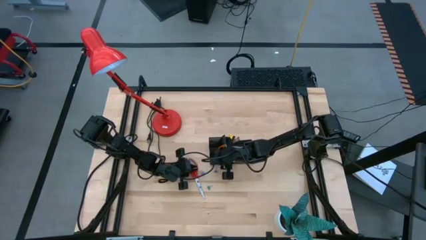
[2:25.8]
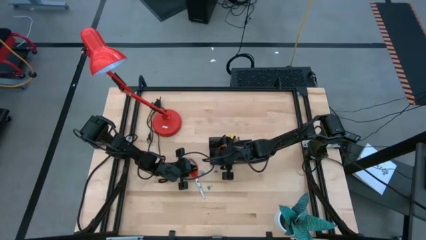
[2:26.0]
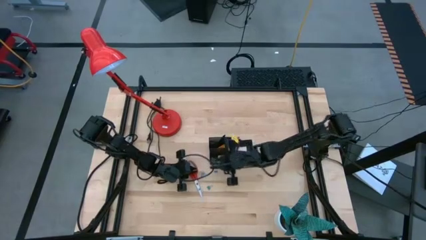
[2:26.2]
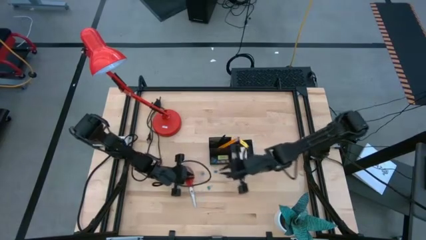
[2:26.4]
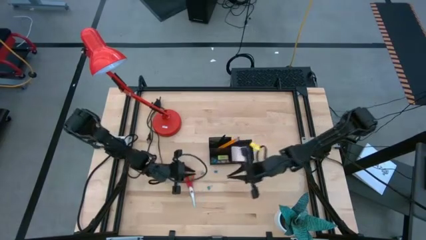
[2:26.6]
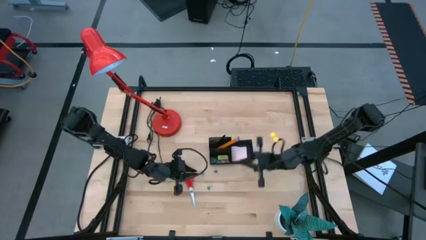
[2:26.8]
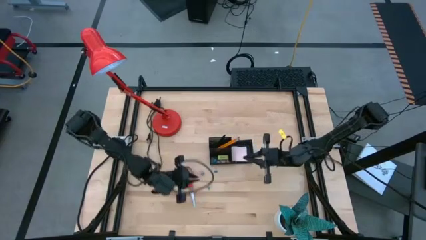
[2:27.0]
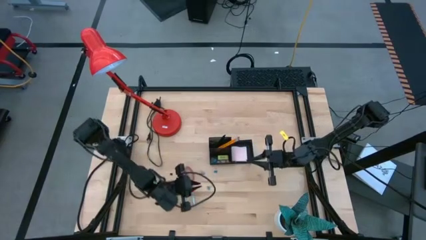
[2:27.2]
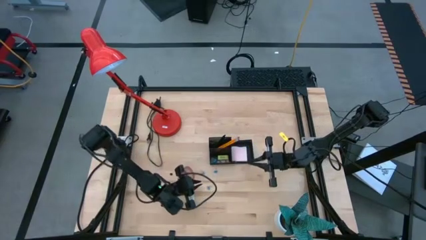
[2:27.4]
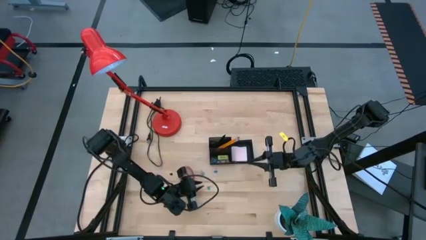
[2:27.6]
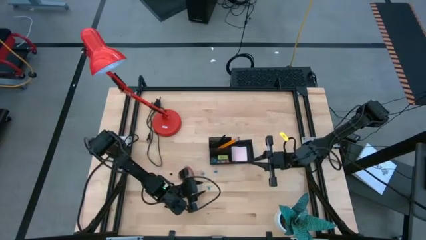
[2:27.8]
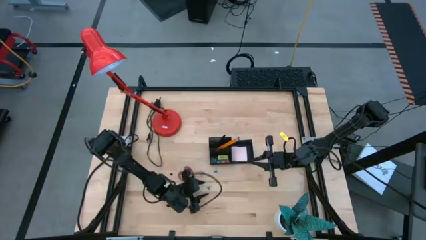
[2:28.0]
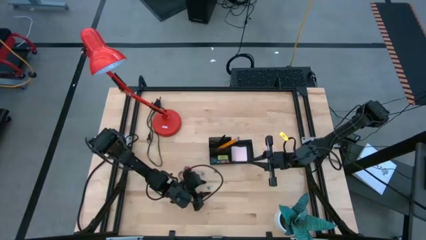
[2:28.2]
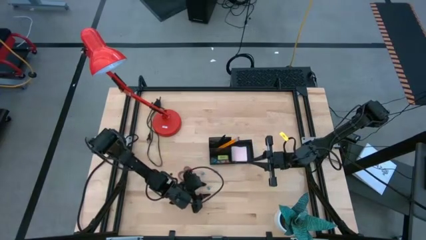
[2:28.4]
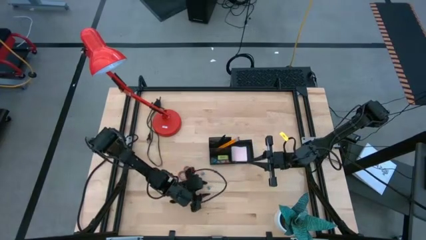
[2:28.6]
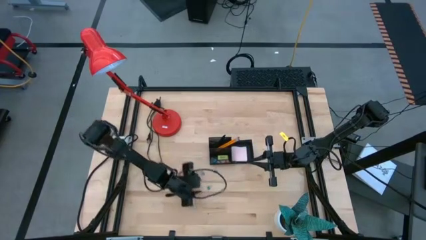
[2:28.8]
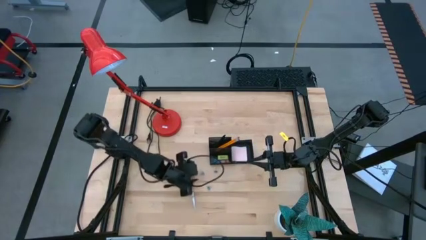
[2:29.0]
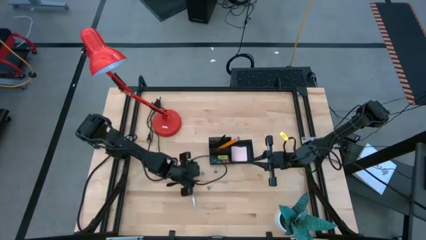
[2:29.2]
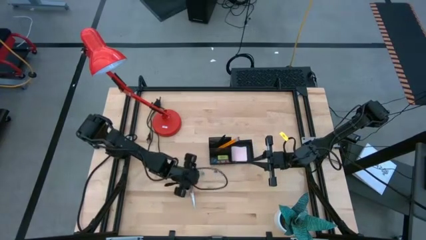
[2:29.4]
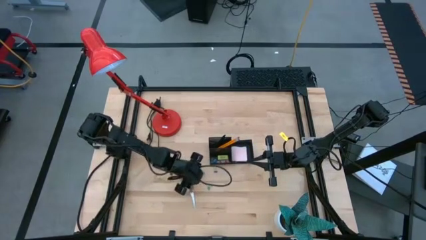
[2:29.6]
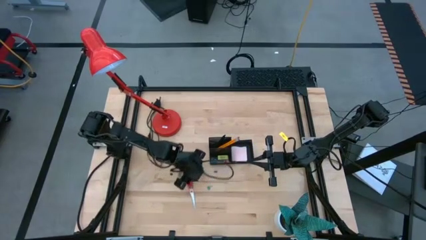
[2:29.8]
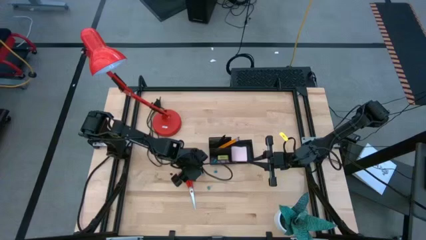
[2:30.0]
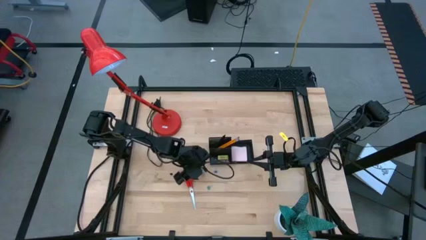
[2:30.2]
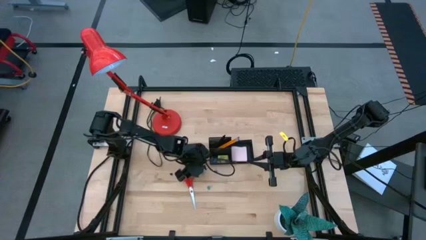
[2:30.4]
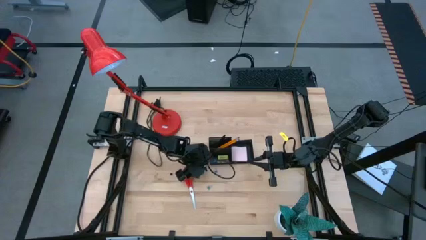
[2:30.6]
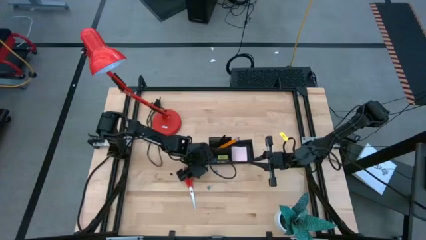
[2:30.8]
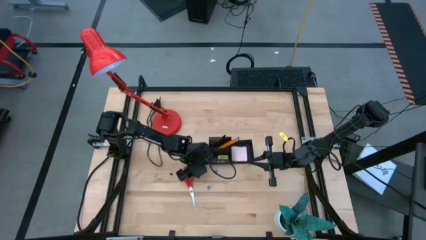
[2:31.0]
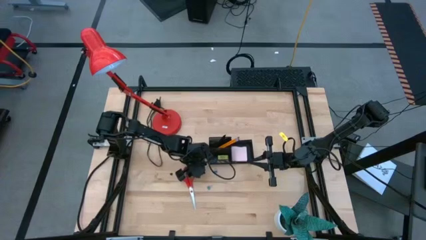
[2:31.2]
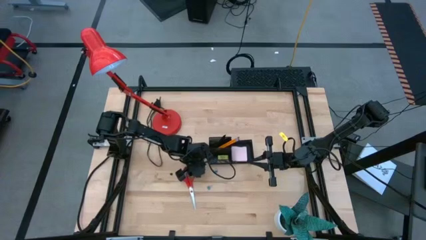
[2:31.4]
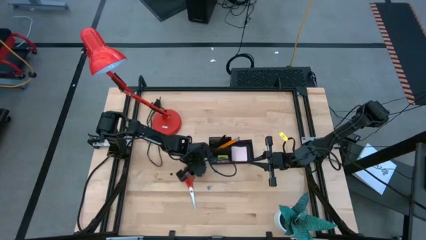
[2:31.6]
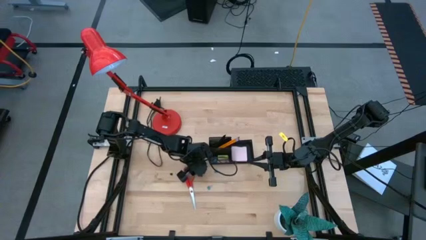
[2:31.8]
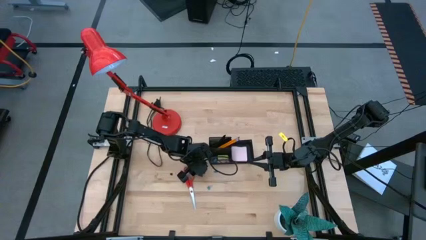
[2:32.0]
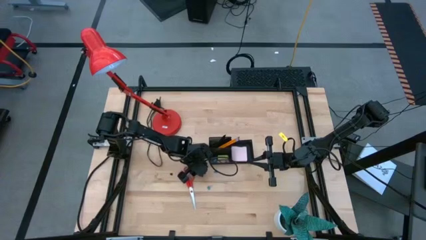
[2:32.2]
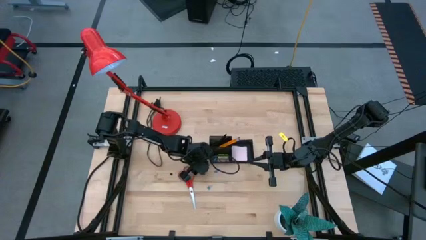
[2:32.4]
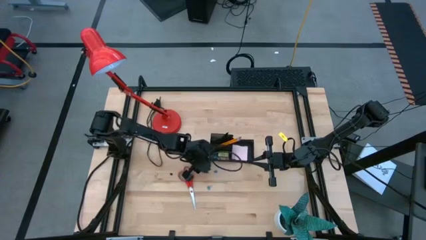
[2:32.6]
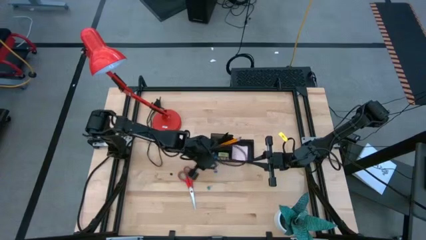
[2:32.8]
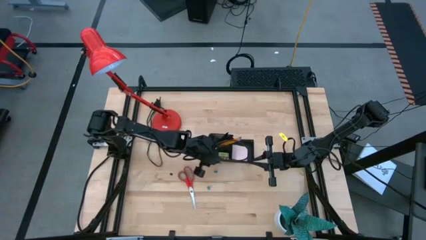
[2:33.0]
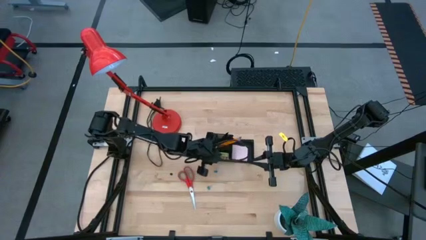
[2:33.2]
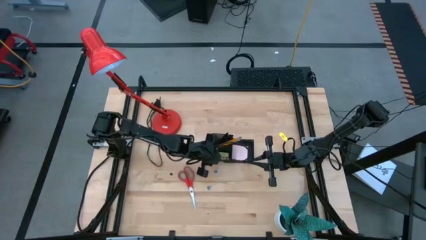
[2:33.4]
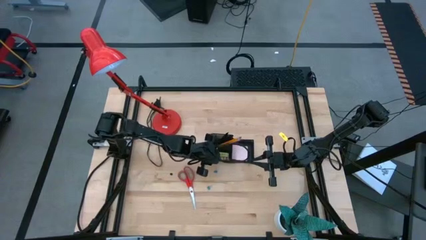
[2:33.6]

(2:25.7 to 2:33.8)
Task: Pick and place office supplies into organizer
Put the blue binder clip into the black desk organizer

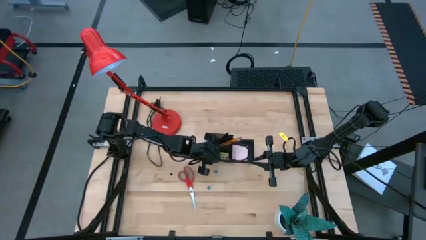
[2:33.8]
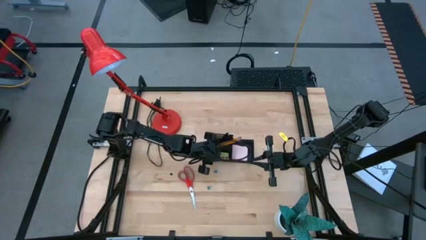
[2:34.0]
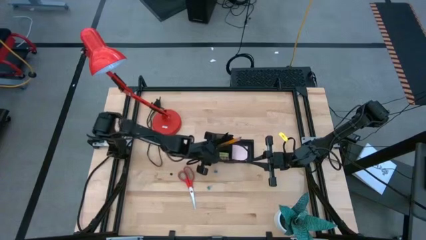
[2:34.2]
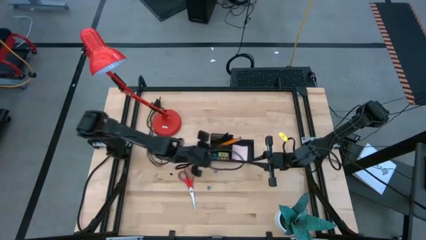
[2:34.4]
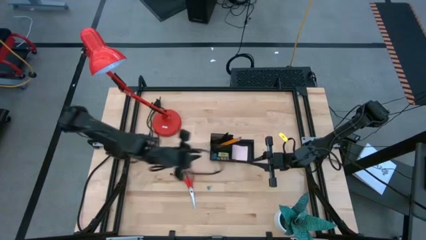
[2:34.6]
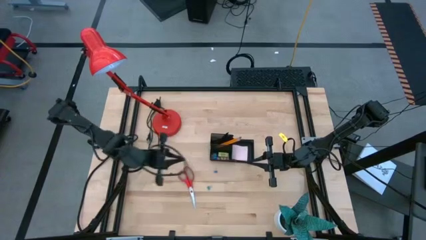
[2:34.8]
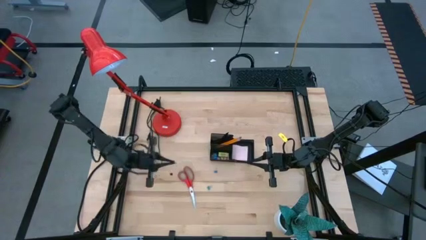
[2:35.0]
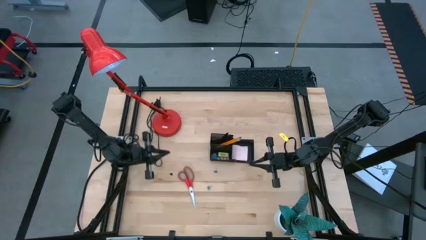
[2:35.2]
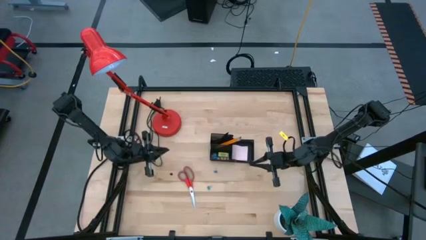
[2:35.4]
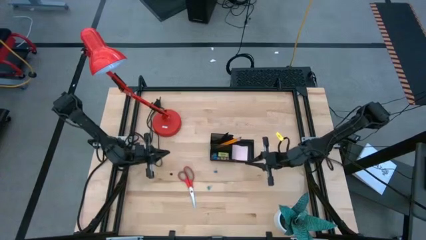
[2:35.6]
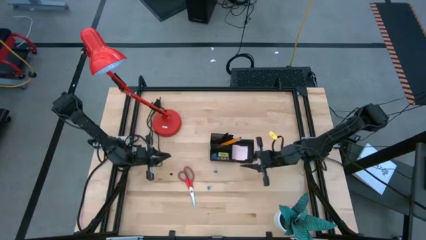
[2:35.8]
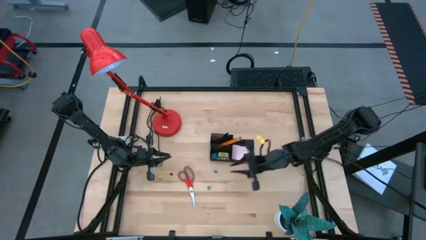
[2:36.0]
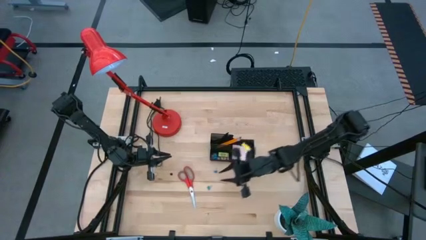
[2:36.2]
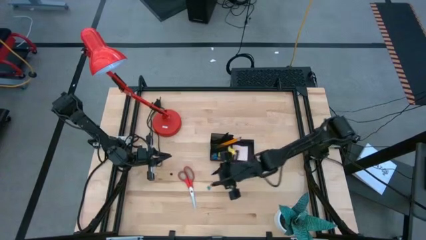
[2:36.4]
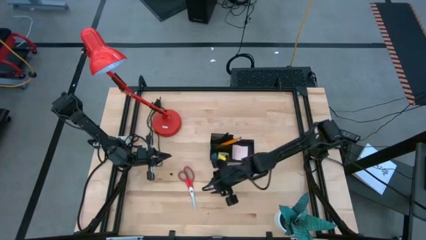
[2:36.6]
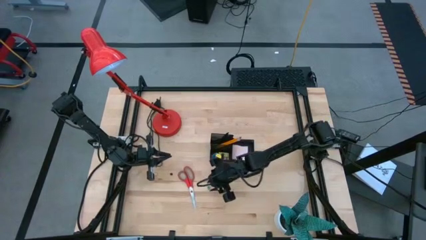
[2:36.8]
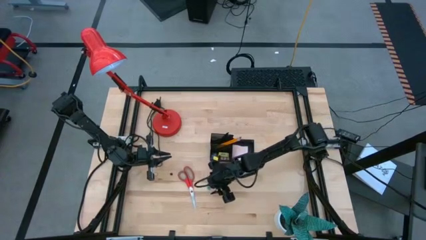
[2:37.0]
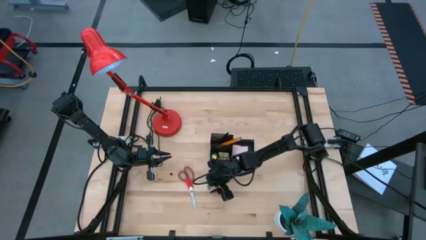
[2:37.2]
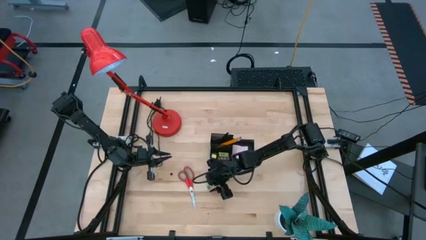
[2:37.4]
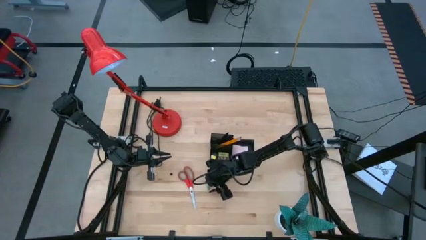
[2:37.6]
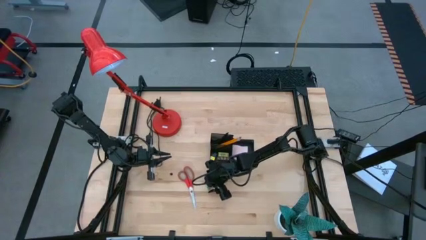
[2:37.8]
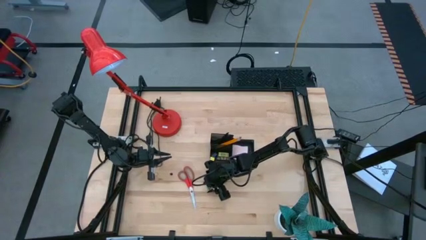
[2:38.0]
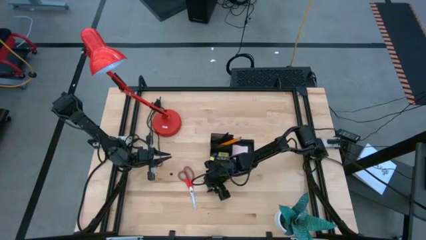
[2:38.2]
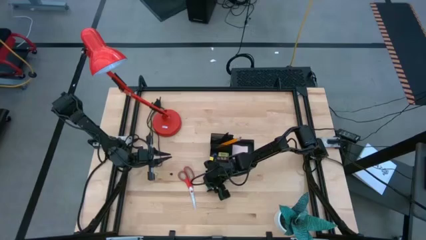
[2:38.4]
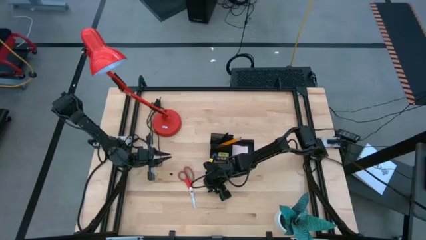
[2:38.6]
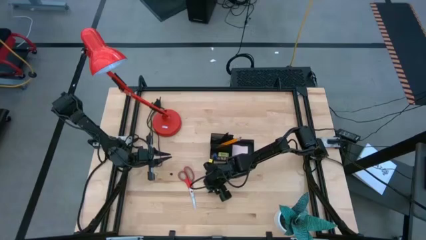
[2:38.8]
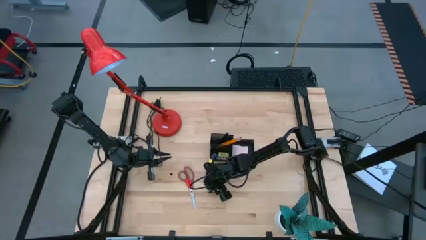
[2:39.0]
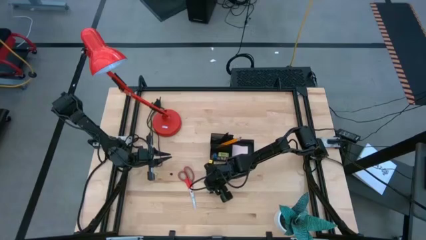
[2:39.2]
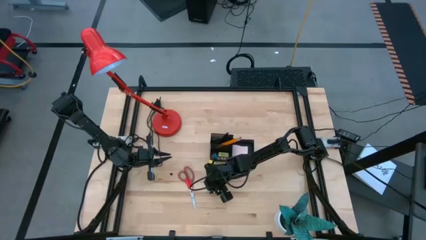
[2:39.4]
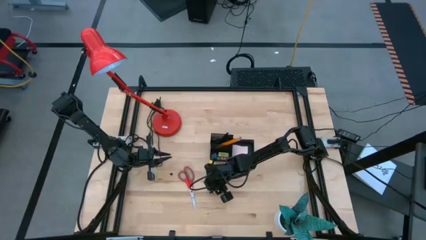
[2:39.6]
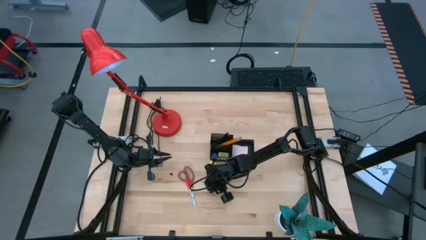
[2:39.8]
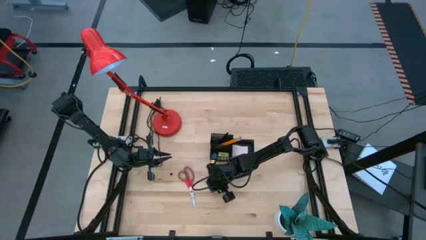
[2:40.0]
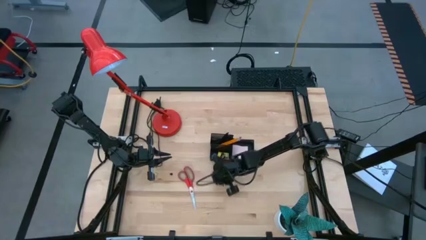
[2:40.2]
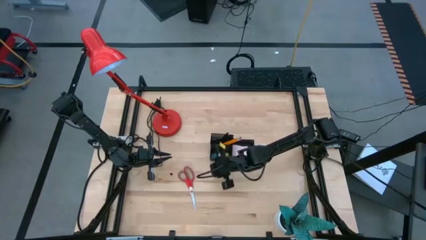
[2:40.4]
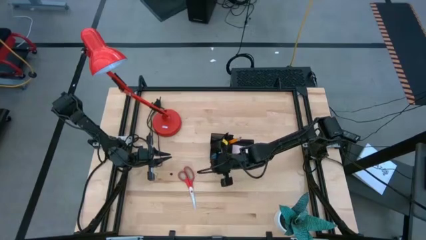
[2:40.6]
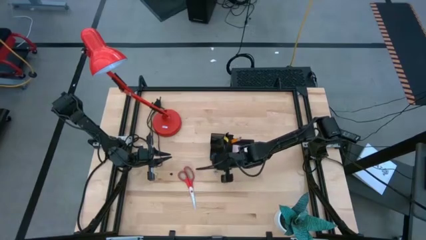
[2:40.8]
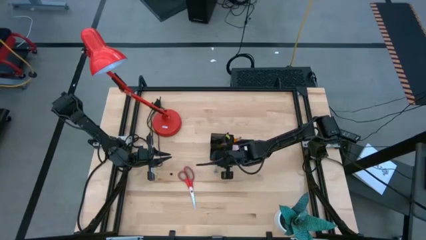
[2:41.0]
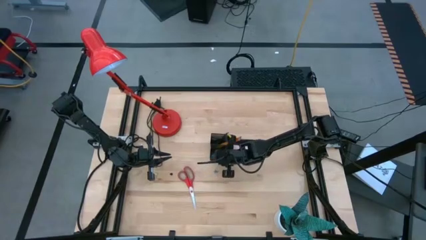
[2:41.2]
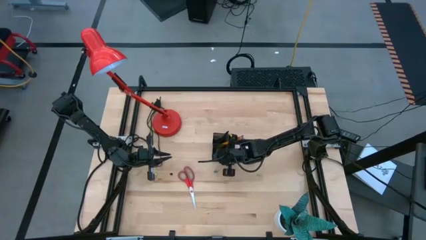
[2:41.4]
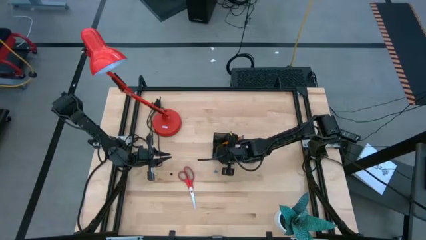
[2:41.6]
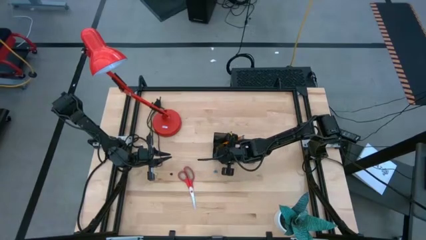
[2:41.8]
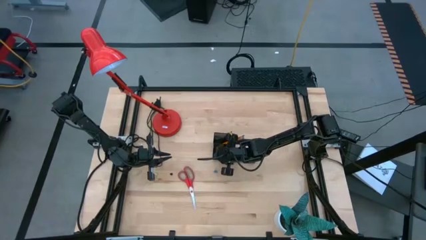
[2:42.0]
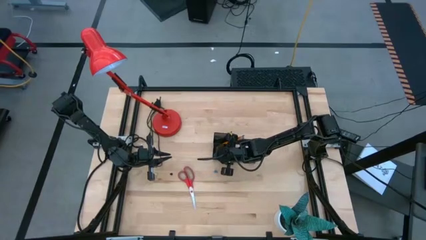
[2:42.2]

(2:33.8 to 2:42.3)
Put the blue binder clip into the black desk organizer

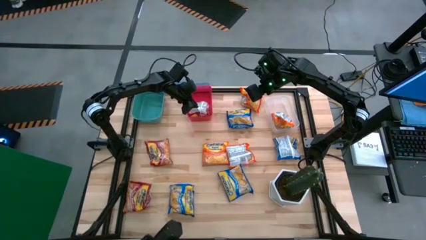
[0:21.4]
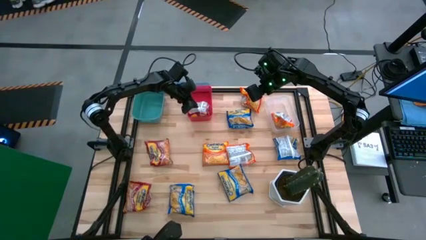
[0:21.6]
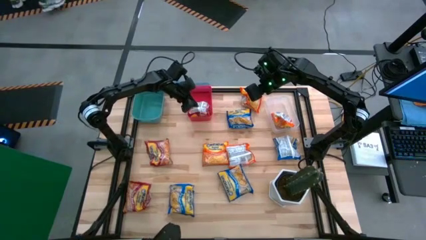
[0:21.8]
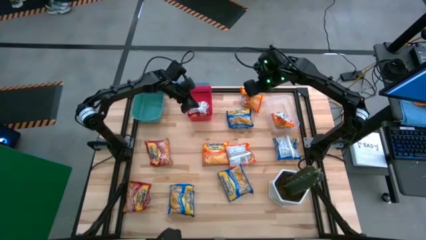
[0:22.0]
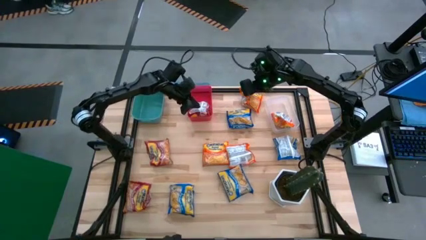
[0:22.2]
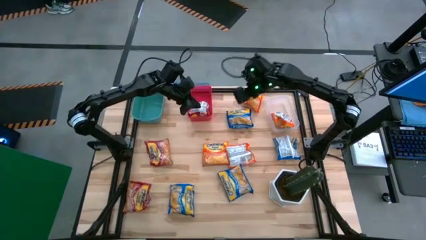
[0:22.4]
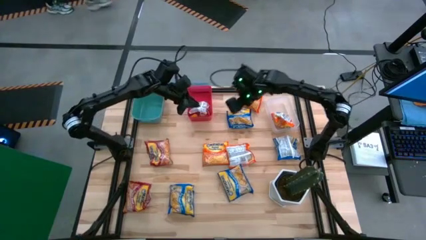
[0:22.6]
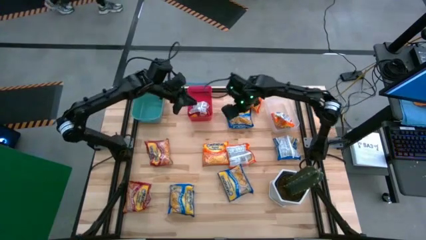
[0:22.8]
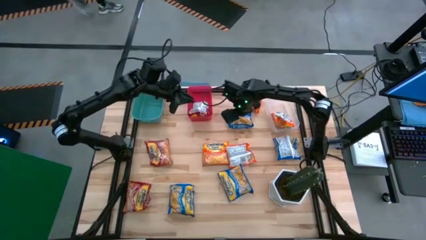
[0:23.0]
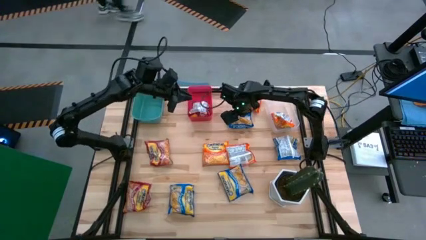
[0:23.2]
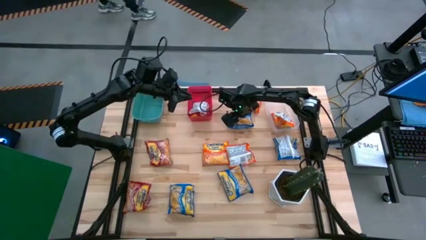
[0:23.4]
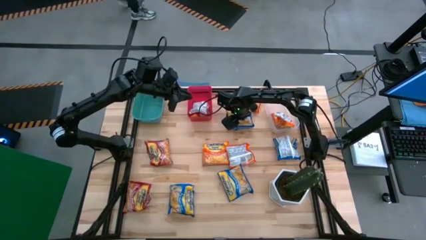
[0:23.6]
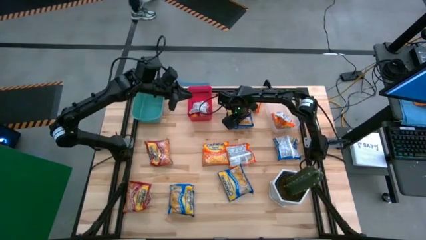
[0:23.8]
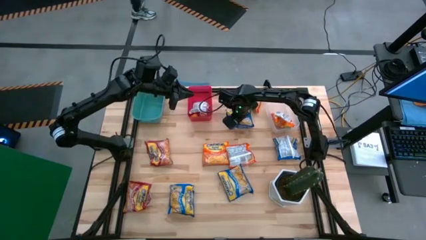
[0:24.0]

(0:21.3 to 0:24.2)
Task: Sort Maruchan noodles
Put the blue noodle pack into the green bin
